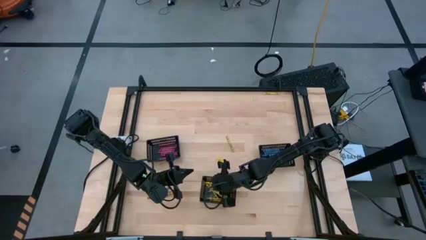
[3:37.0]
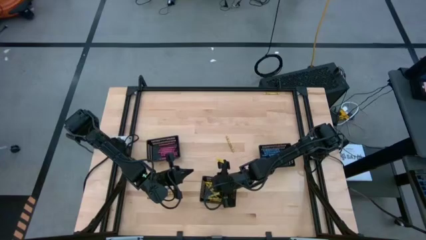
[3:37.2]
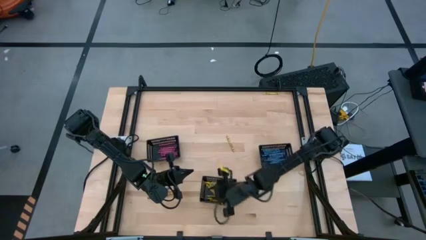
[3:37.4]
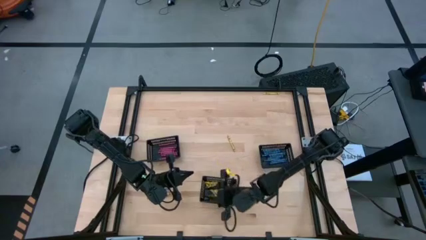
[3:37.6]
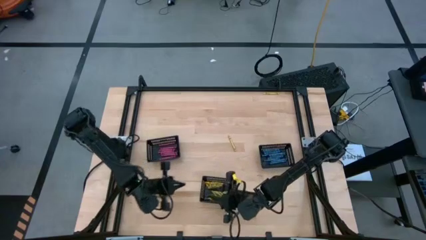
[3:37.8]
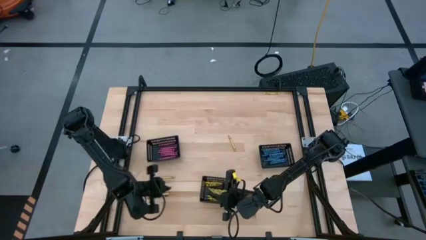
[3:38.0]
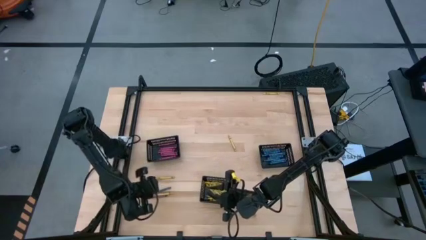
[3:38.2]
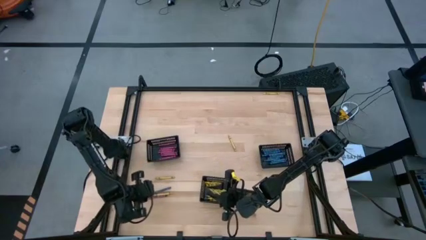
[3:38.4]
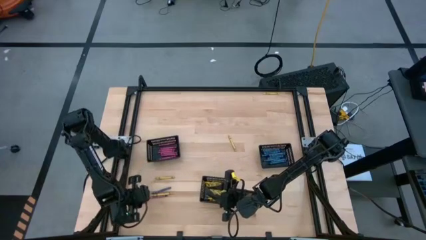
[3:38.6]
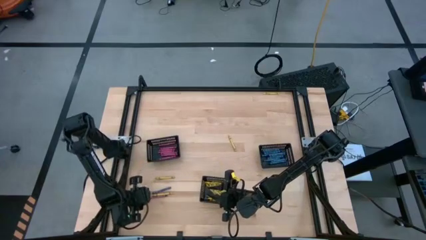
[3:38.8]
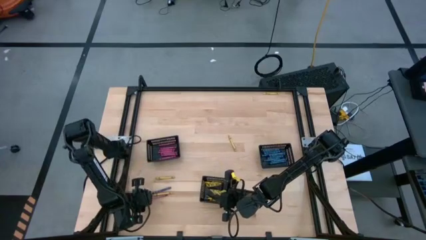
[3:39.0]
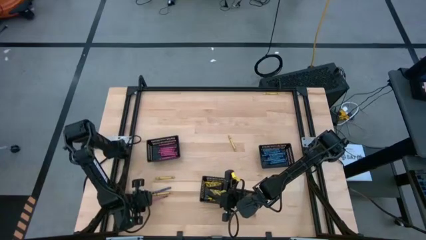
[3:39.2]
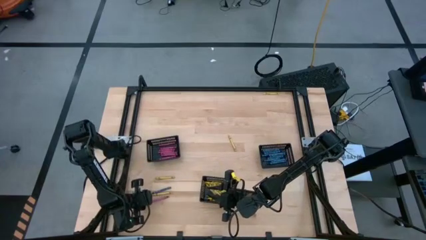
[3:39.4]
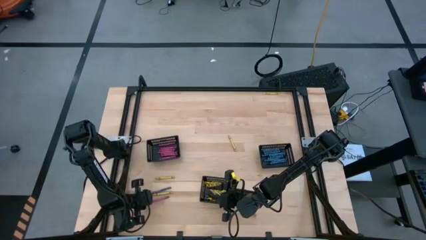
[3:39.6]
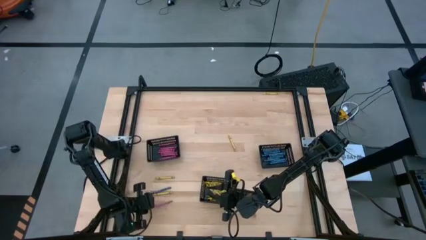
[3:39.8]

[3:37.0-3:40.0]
Task: Sort crayons
Put the red crayon into the left black bin

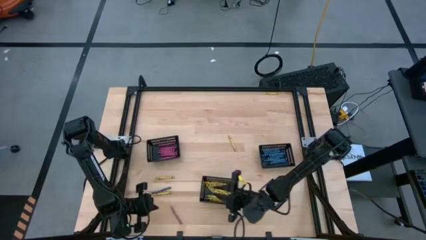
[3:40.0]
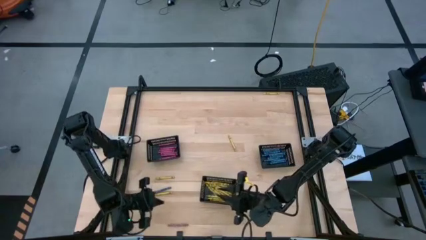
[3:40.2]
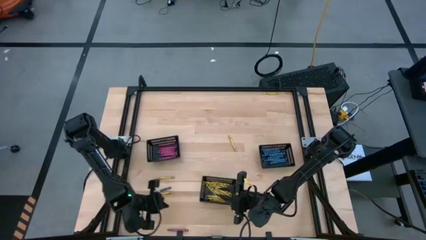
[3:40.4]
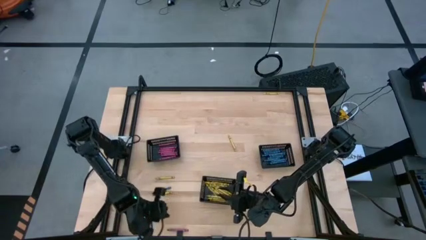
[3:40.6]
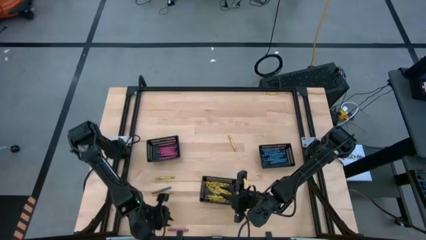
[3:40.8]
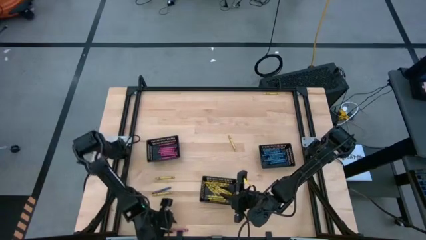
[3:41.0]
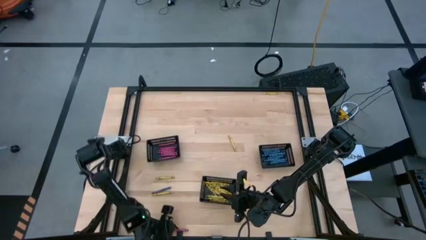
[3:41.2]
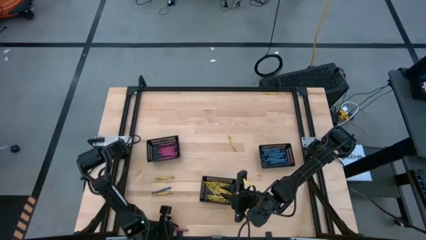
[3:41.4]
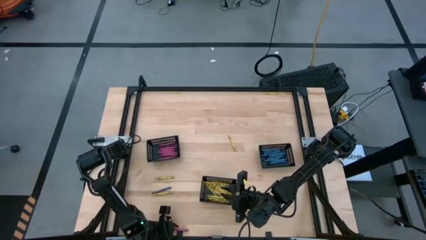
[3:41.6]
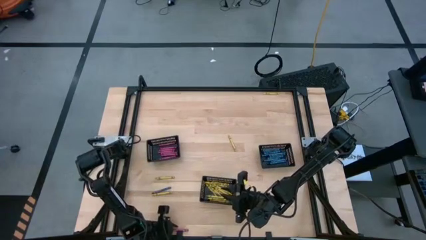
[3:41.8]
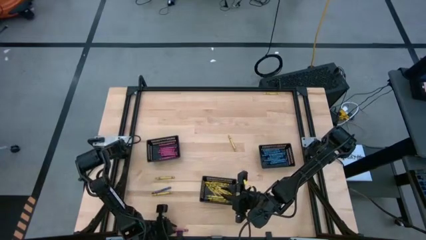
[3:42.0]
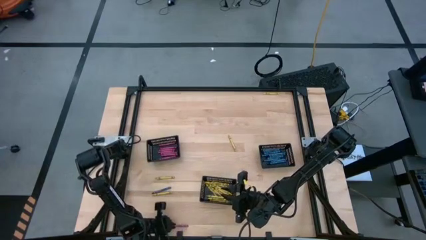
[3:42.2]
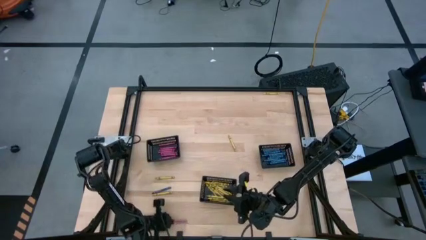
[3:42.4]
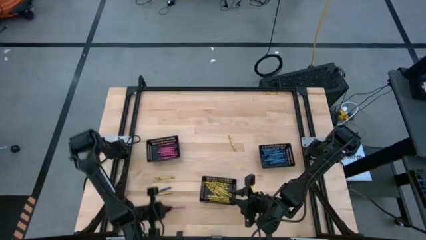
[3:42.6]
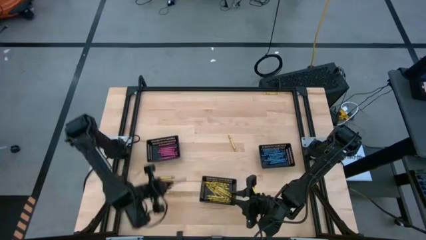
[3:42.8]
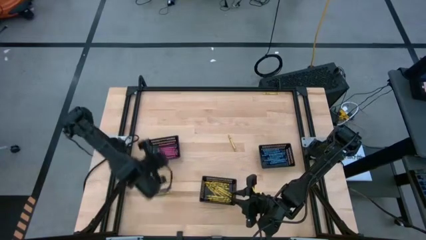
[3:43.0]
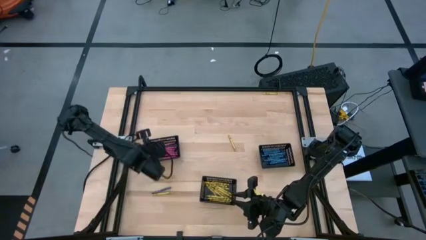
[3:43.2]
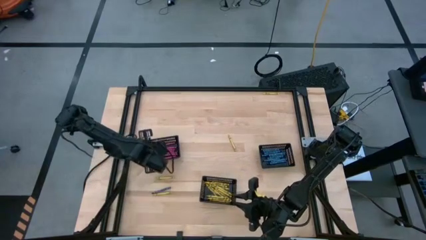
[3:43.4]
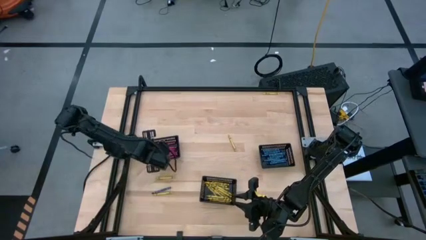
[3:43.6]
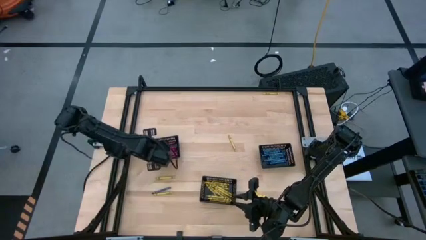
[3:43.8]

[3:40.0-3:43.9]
Put the red crayon into the left black bin

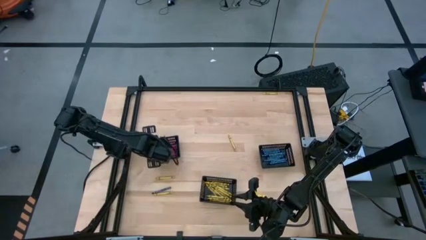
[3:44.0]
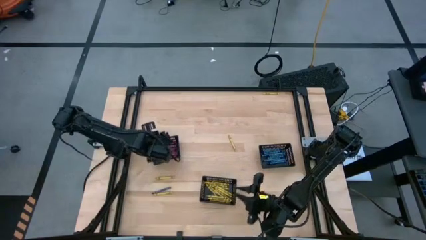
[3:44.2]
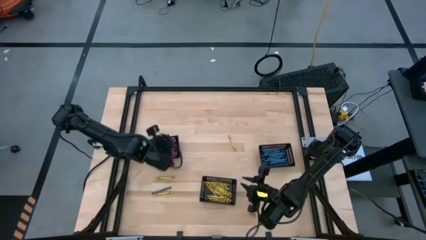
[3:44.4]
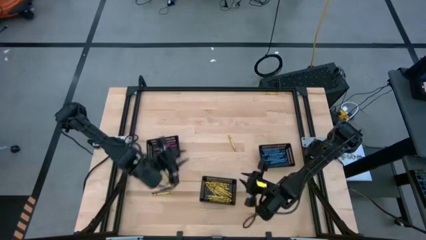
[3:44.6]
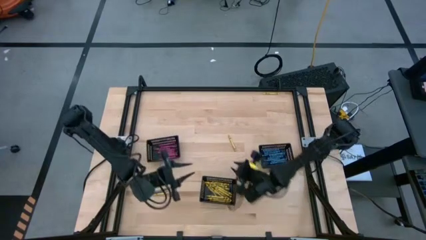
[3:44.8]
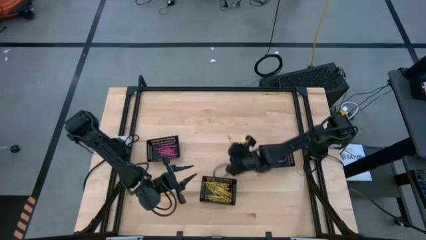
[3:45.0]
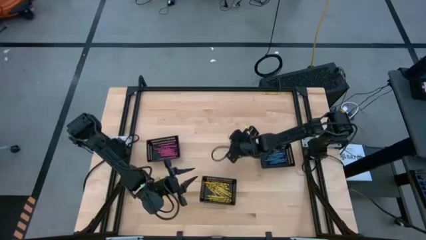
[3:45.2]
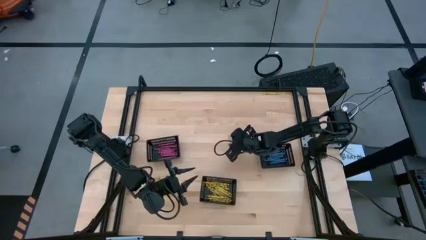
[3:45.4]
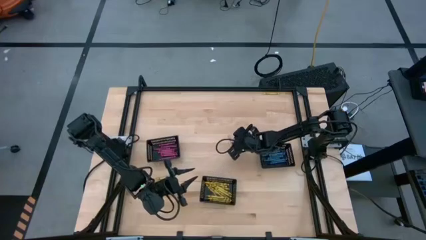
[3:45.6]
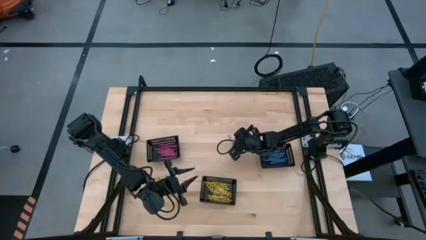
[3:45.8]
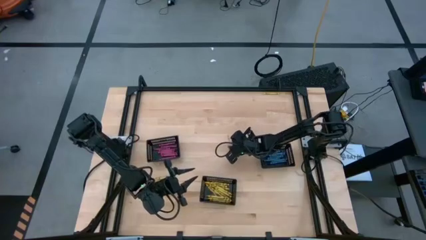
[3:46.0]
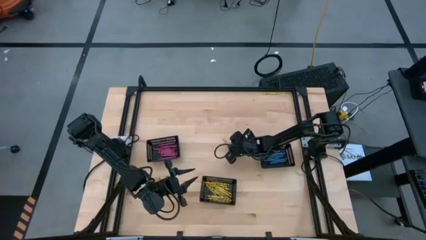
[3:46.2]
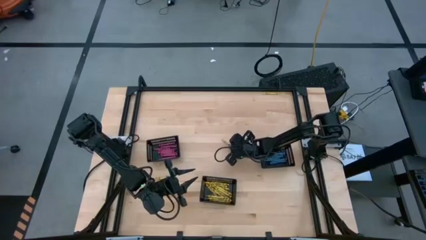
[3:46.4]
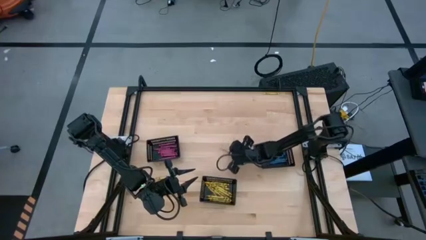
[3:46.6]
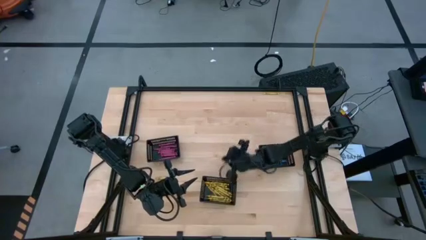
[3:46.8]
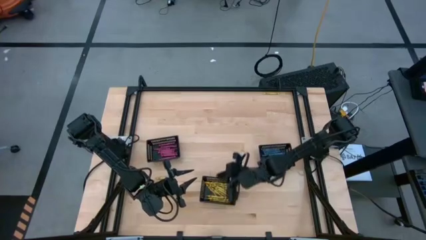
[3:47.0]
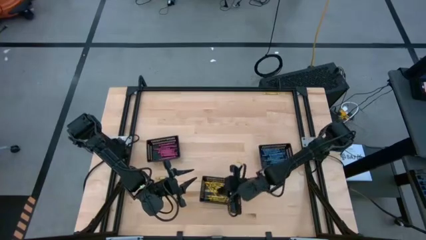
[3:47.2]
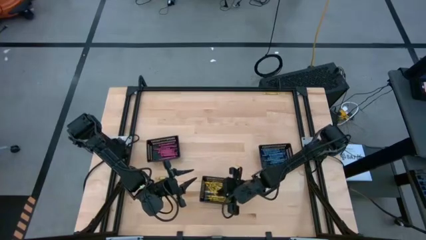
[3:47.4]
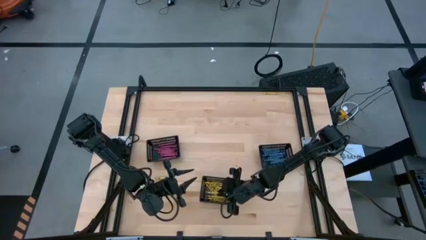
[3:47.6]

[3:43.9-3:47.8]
Put the yellow crayon into the bottom black bin

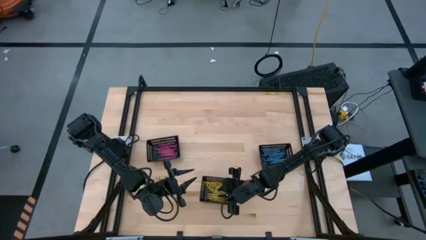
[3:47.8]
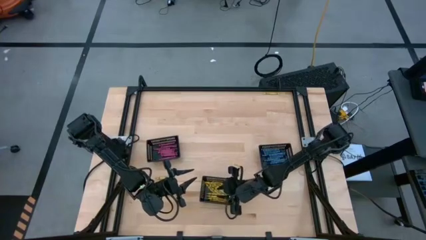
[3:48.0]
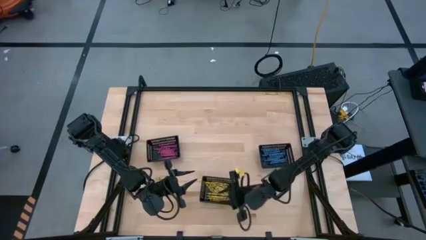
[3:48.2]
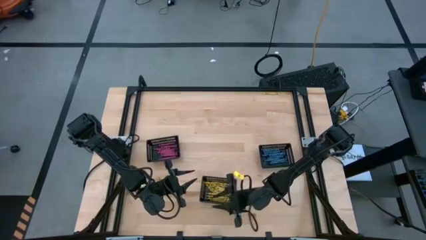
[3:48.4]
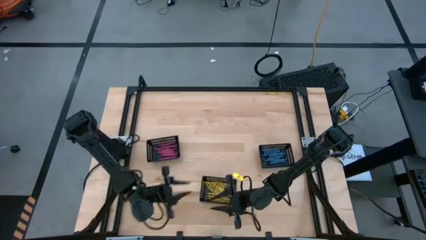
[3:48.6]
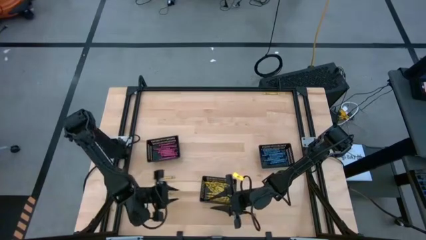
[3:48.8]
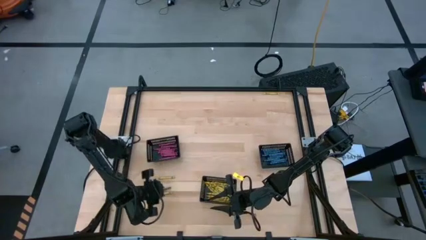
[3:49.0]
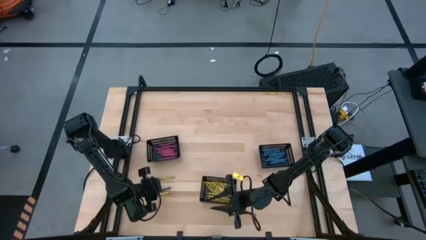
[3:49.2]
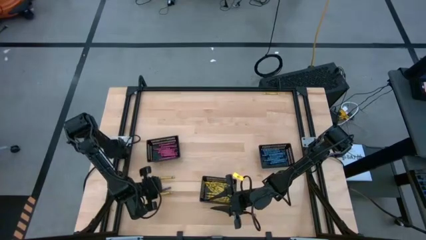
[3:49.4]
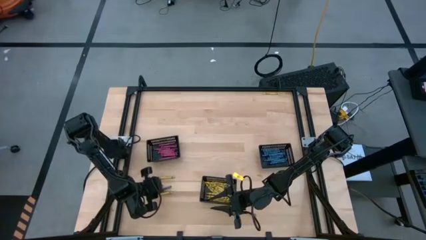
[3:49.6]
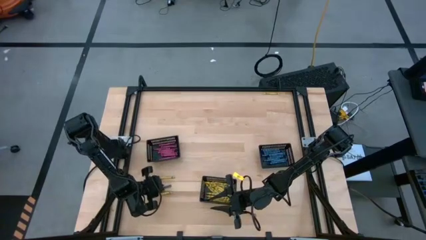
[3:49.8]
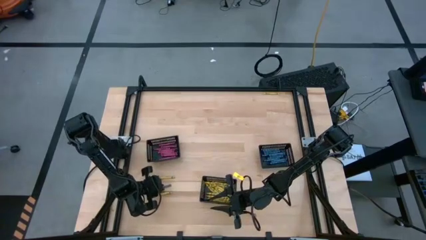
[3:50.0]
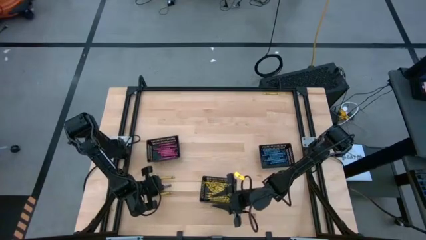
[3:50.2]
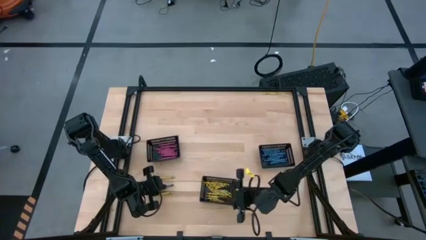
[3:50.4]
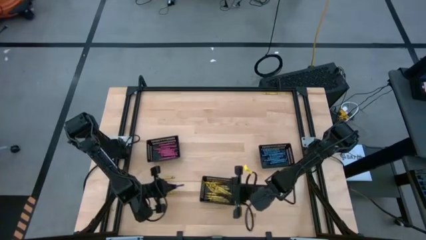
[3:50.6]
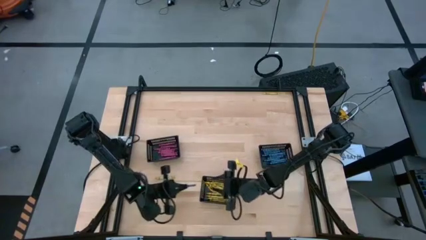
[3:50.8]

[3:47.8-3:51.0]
Put the blue crayon into the right black bin

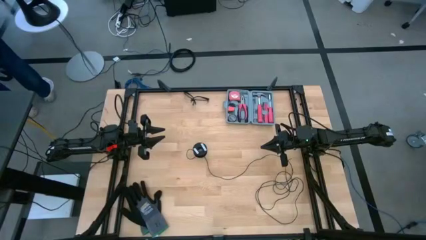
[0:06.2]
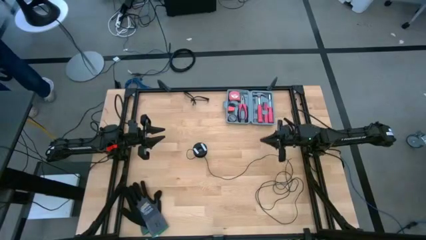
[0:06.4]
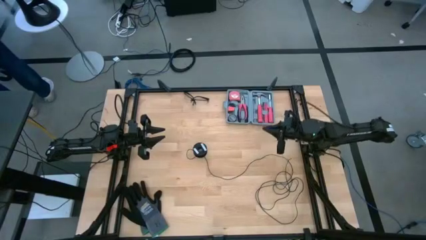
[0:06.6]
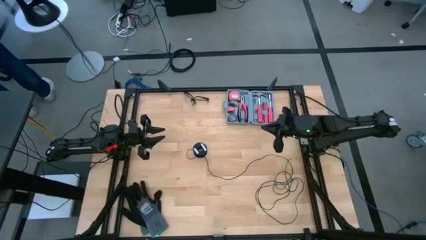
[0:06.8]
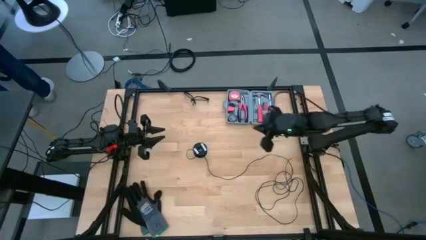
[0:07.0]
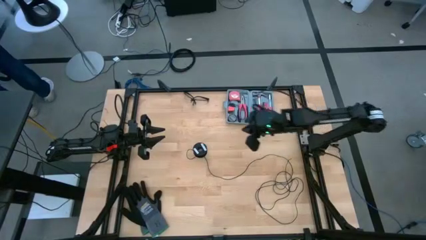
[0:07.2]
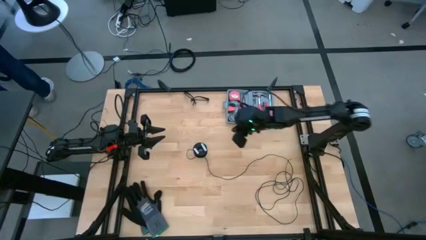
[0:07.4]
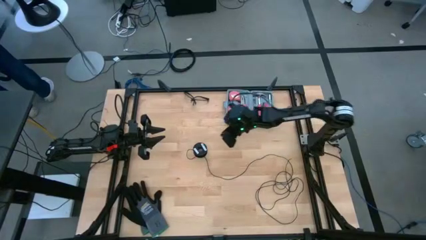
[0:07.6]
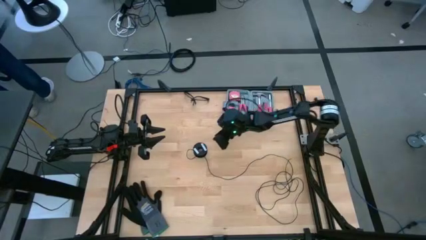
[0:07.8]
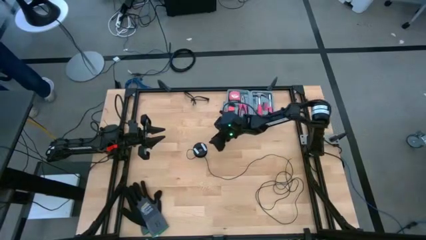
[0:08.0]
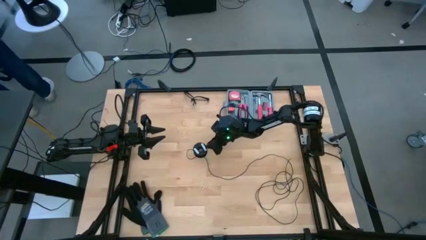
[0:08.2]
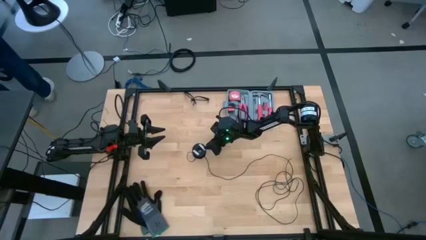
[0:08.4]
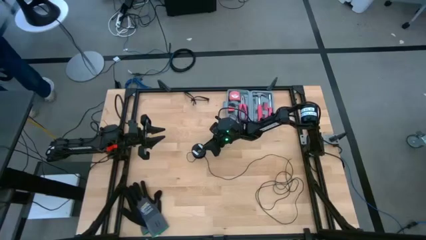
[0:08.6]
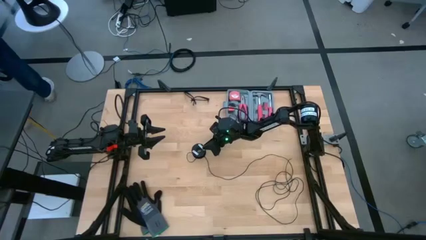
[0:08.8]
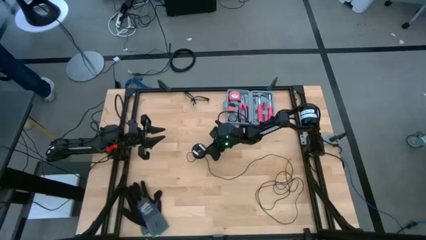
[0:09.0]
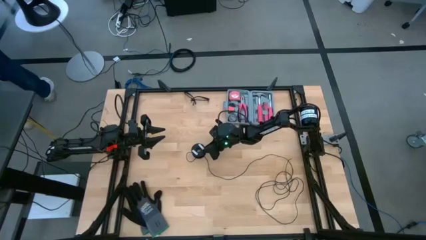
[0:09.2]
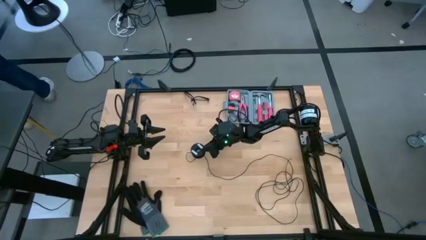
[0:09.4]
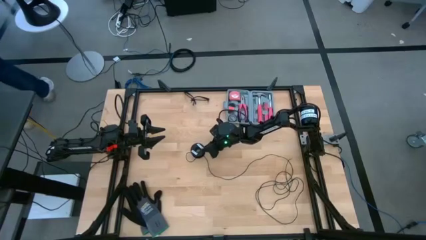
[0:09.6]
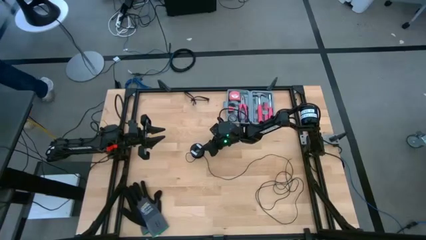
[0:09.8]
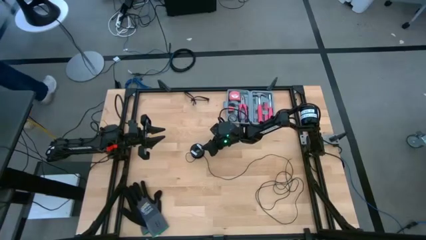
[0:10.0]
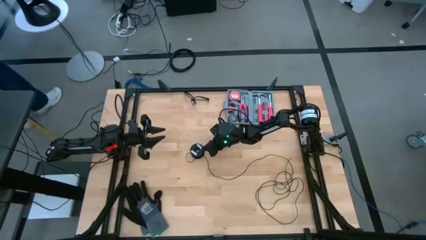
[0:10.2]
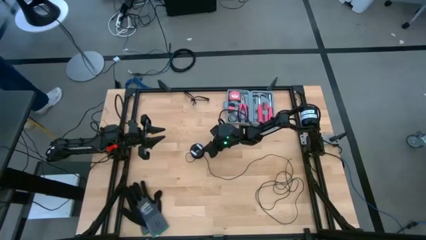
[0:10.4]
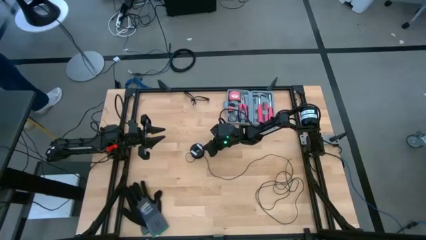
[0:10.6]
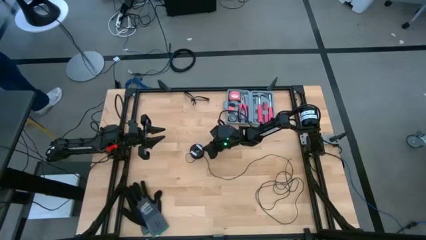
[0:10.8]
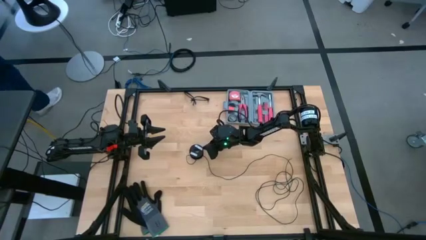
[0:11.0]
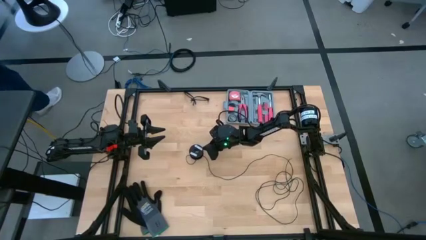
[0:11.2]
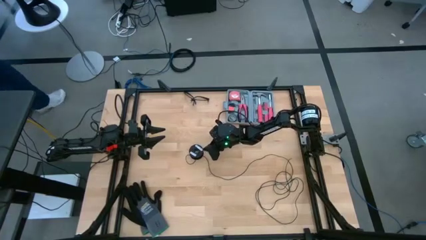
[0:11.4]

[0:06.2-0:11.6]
Task: Coil cords
Coil the black wire onto the spool
